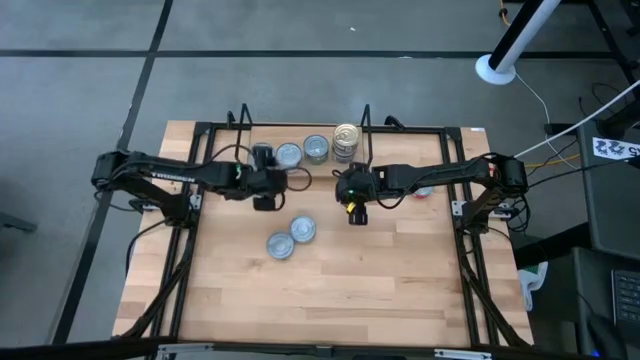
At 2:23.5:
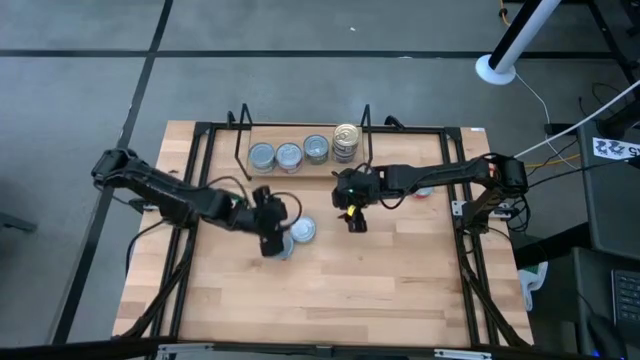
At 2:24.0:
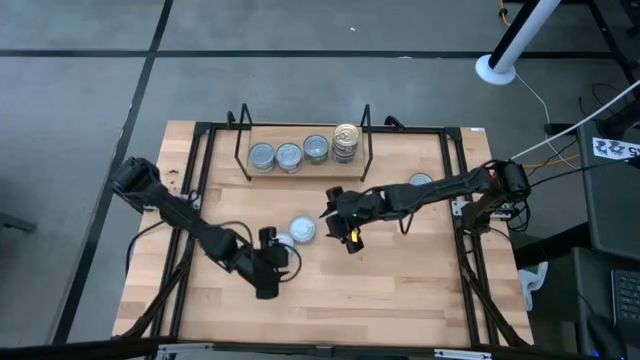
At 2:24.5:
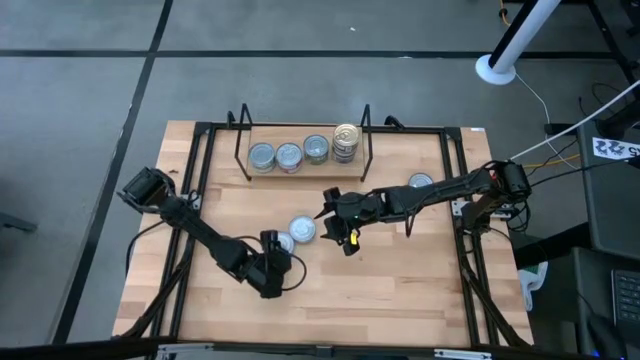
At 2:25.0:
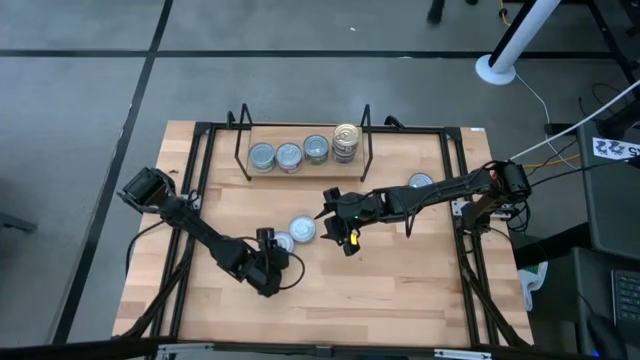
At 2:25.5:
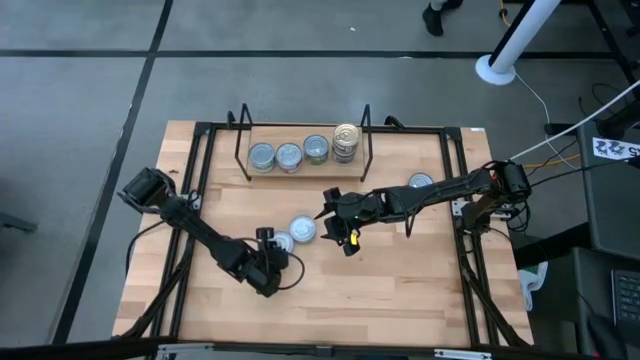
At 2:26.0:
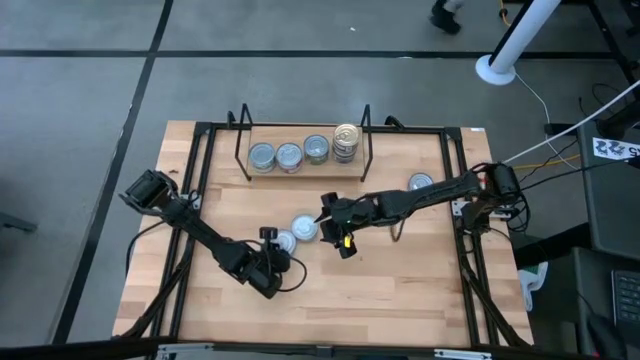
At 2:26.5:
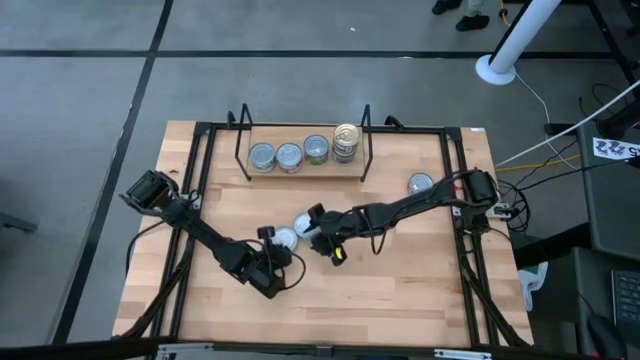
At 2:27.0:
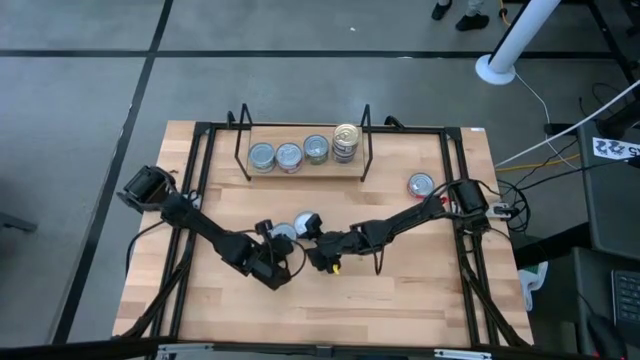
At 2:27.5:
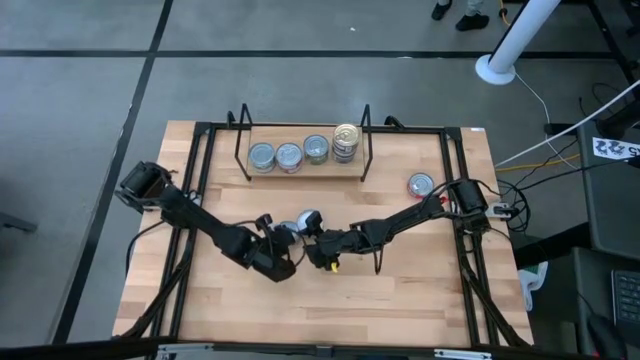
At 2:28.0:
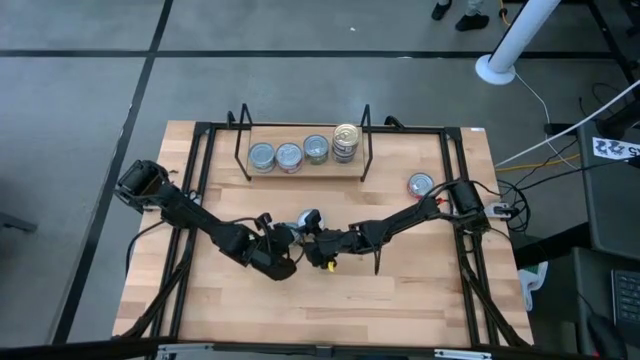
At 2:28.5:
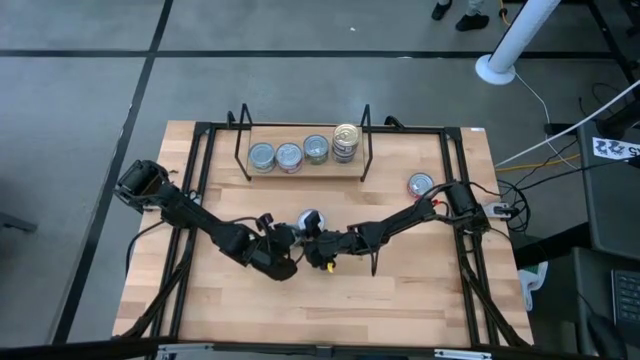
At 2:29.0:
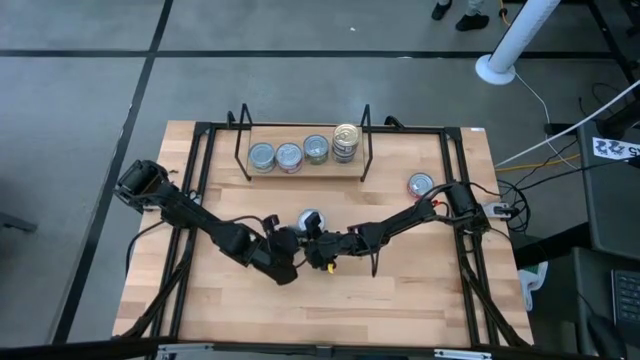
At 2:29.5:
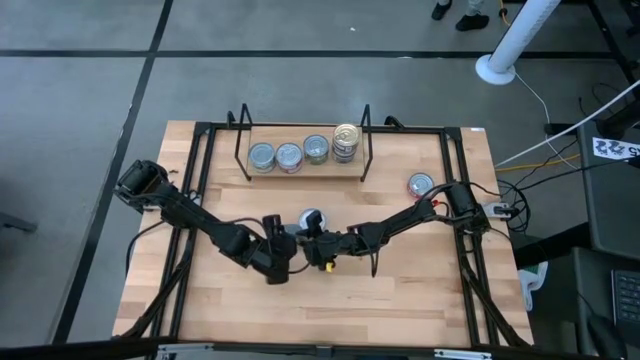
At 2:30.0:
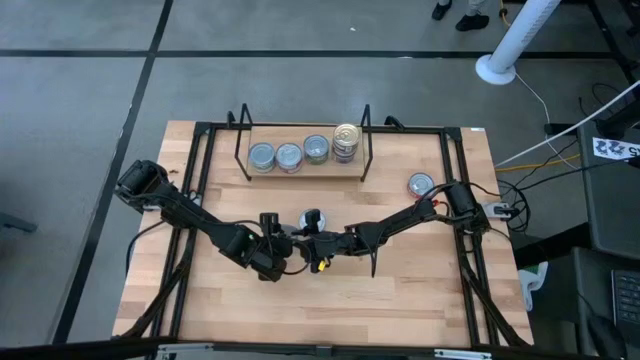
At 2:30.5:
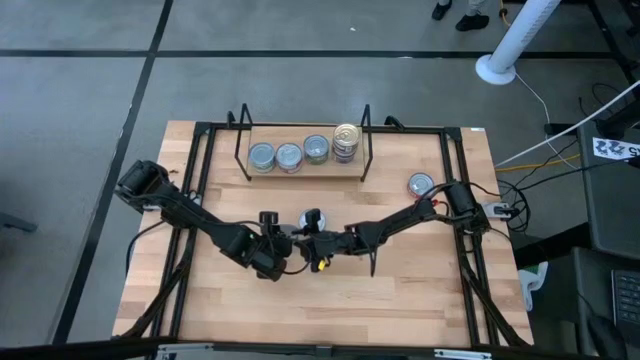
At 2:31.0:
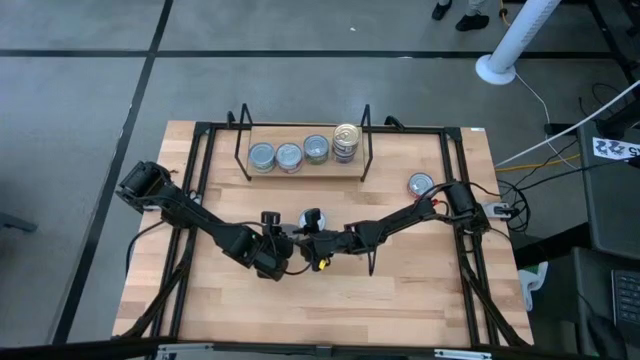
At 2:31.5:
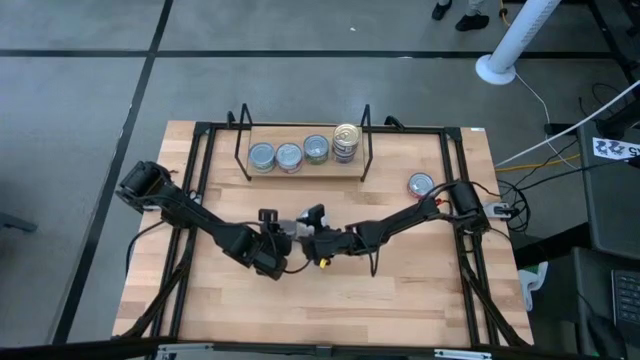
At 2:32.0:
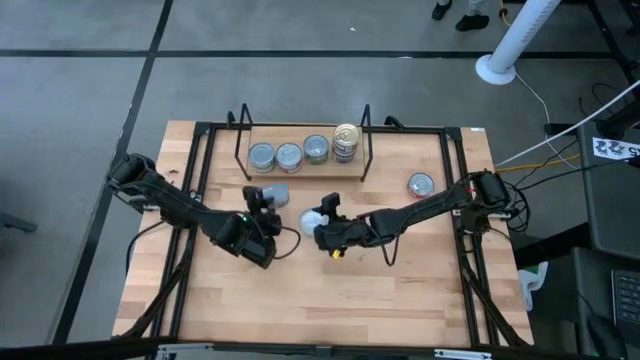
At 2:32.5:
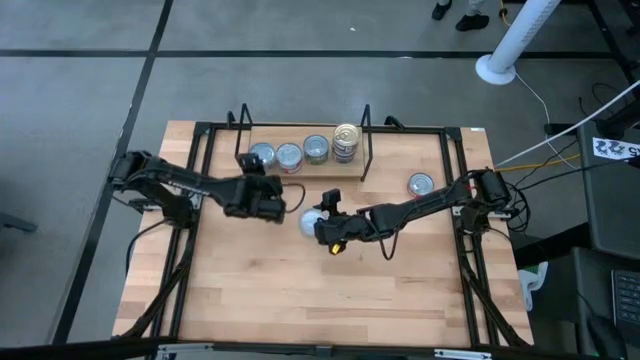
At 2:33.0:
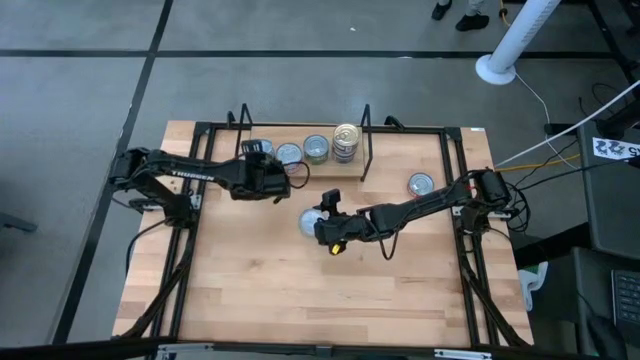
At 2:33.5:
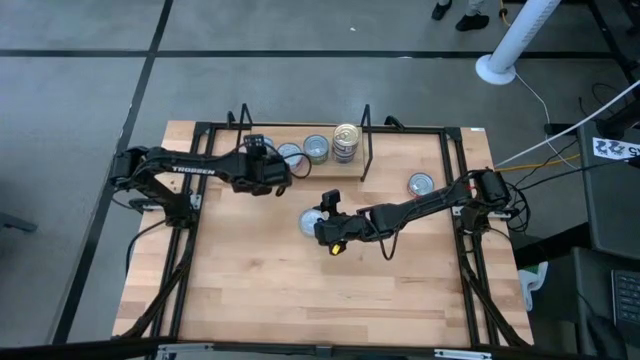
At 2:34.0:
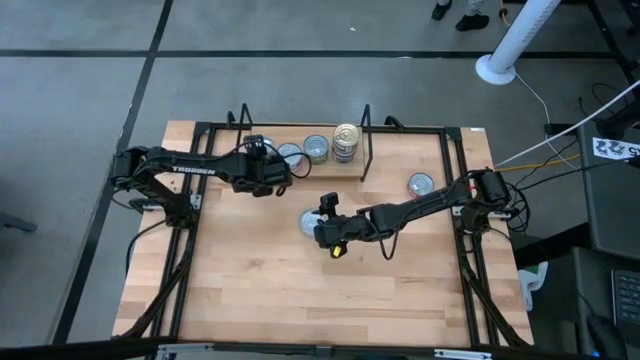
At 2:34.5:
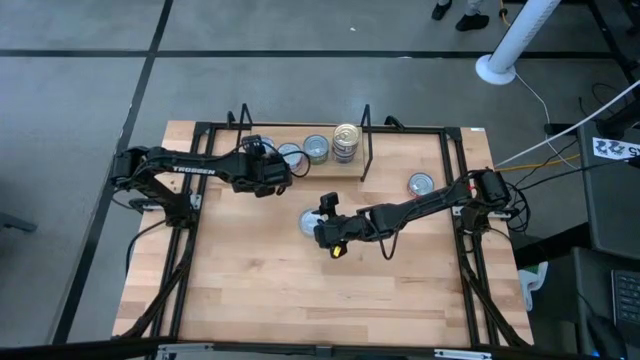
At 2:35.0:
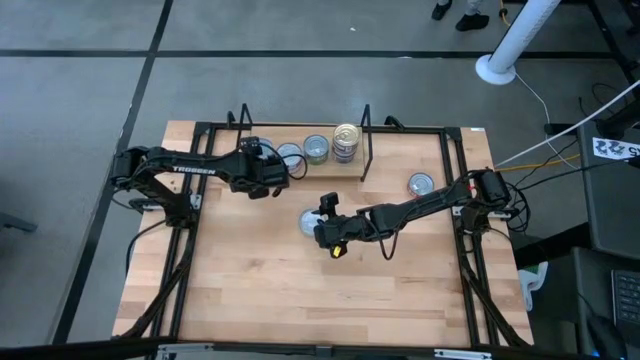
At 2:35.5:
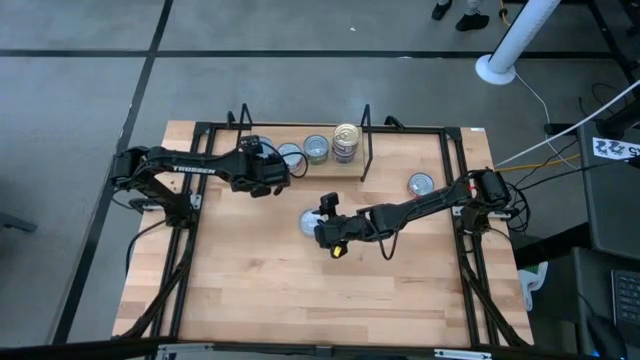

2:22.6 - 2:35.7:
Task: Stack canned seafood by type on shelf
Stack the green-white tuna can on top of the green-white tuna can on the shelf

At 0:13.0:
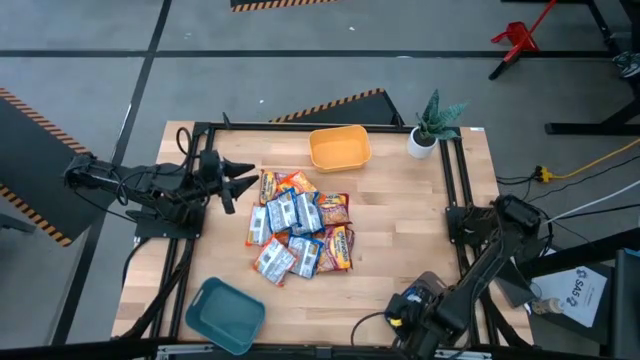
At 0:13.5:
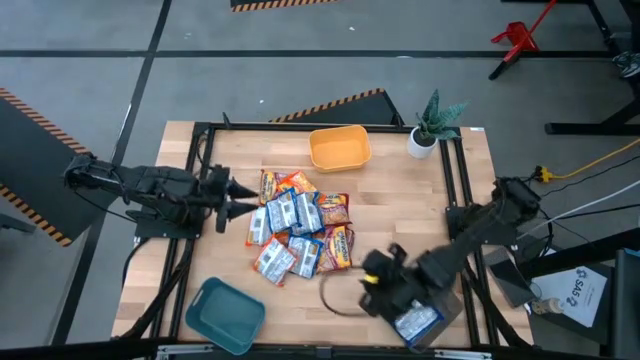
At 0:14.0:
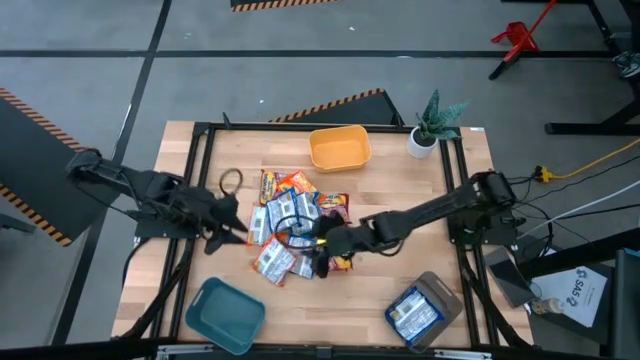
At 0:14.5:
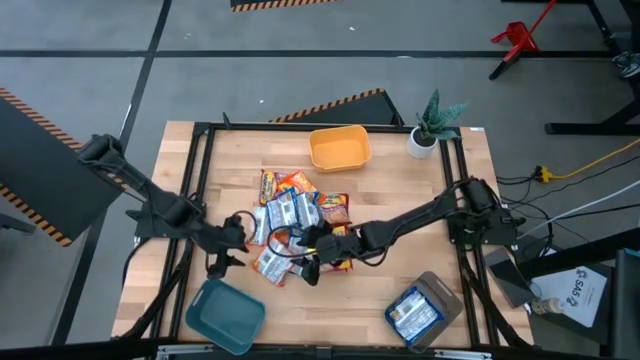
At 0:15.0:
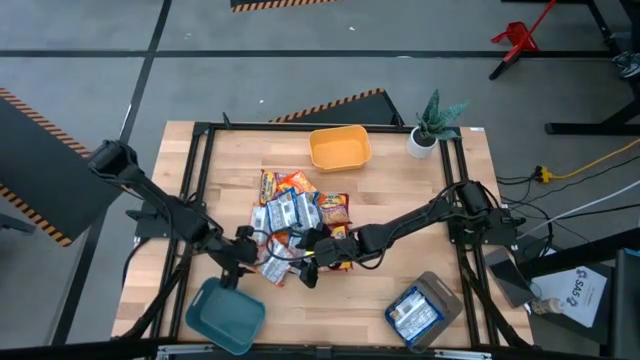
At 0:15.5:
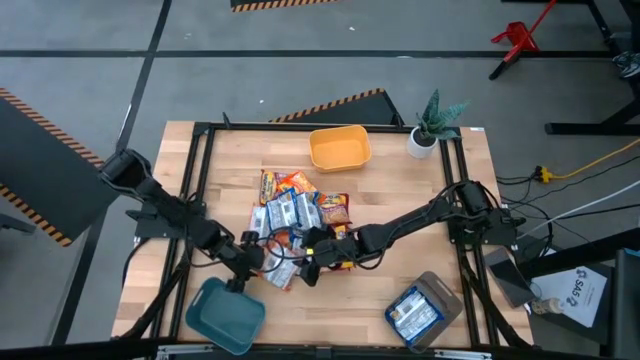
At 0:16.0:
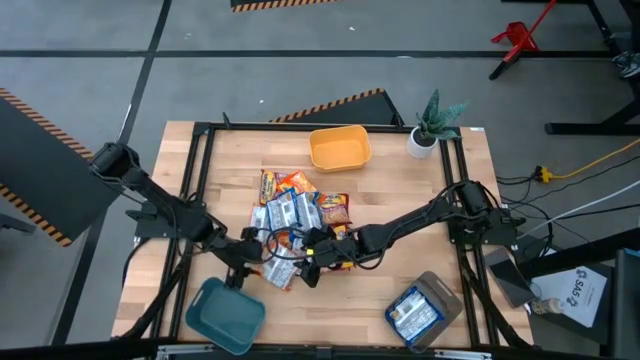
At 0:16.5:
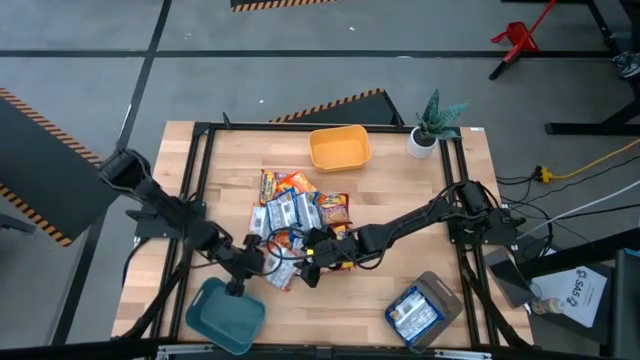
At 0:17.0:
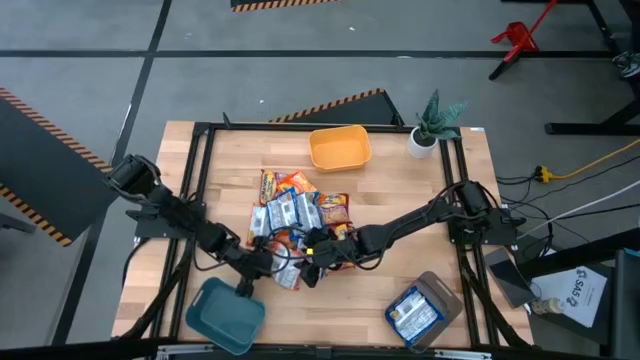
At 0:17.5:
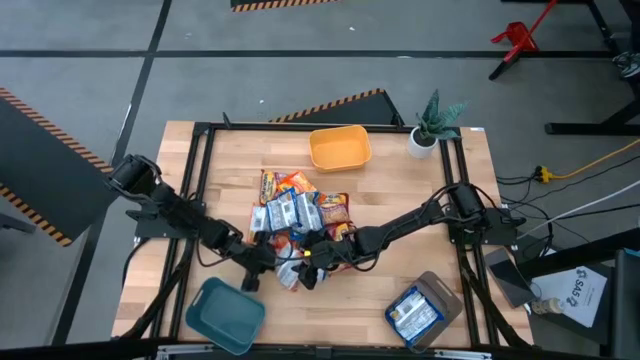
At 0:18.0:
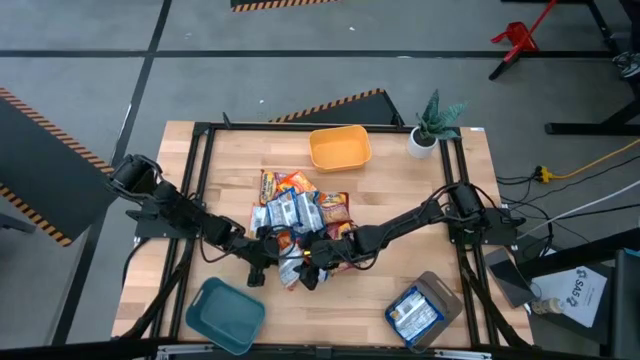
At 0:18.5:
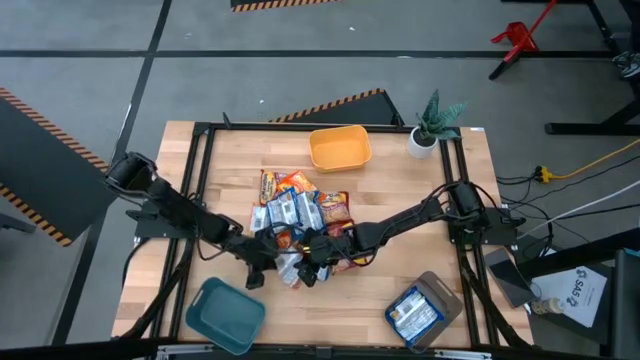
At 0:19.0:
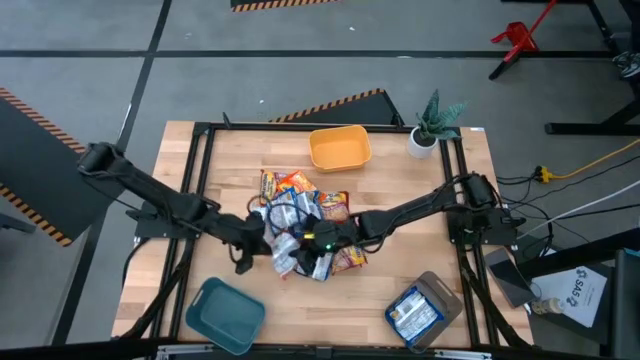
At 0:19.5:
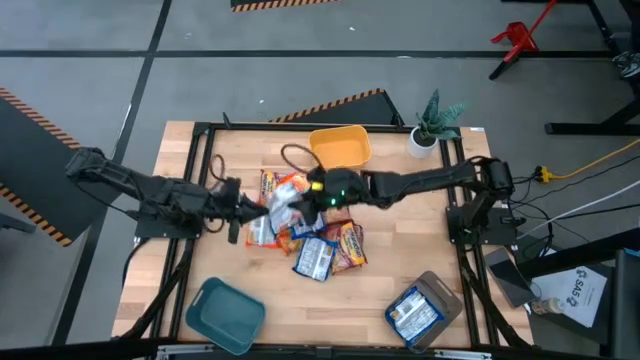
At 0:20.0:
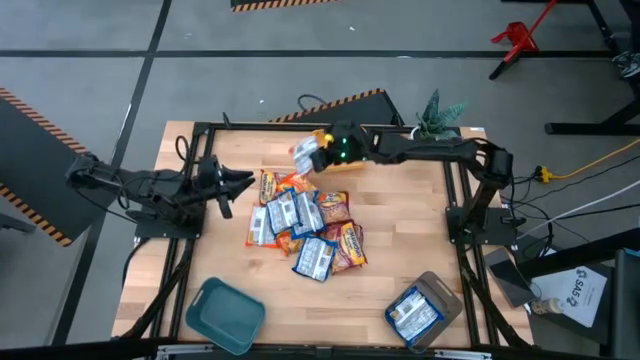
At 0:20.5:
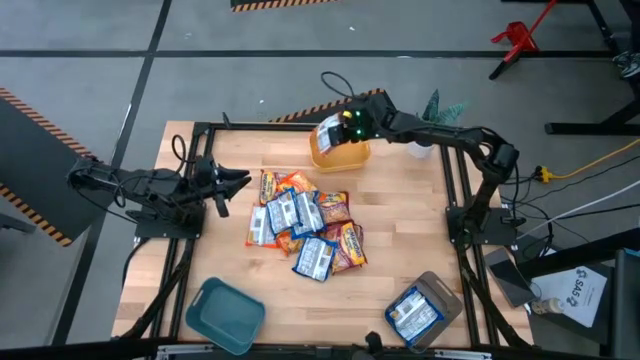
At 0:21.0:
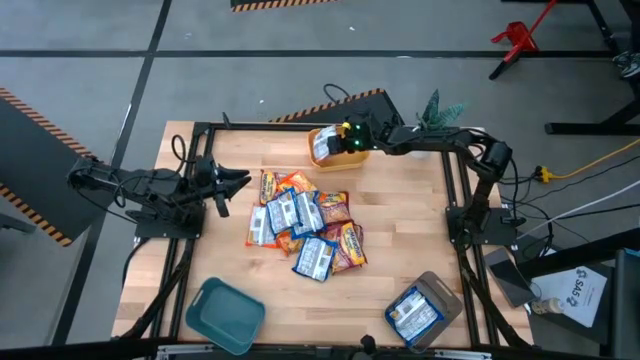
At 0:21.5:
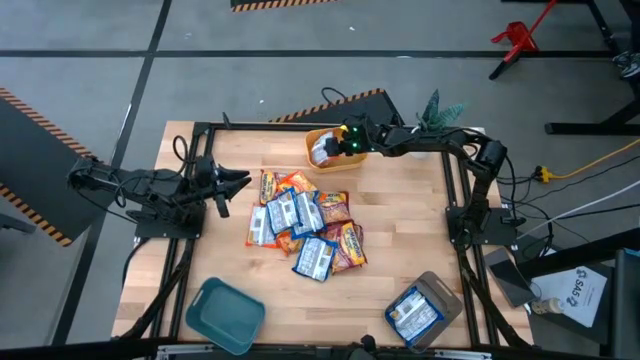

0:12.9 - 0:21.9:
Task: Sort Maruchan noodles
Put the orange noodle pack into the yellow bin
